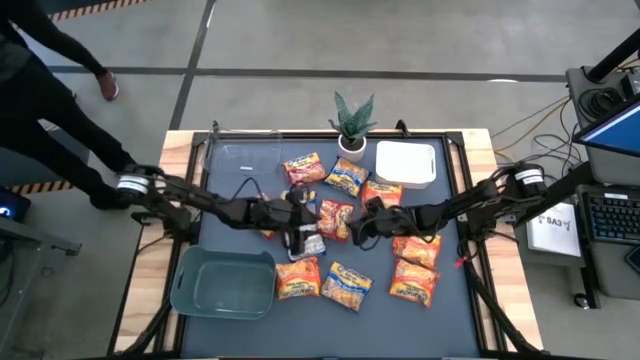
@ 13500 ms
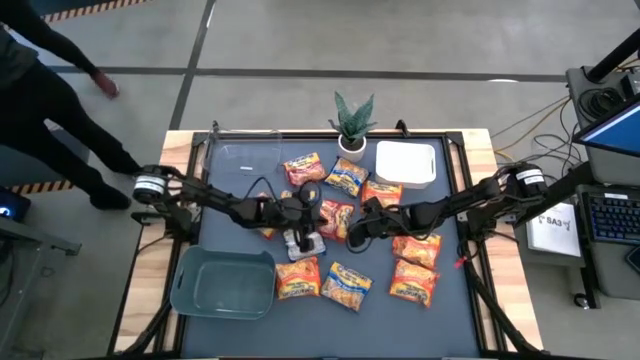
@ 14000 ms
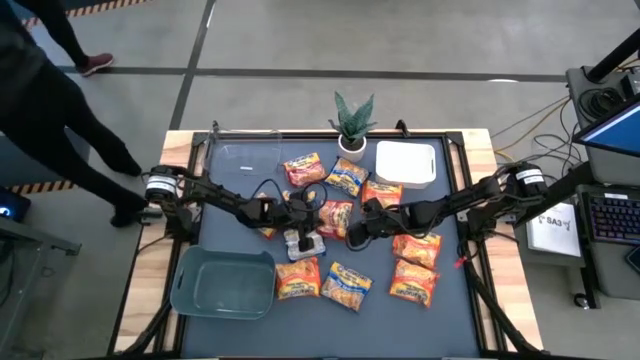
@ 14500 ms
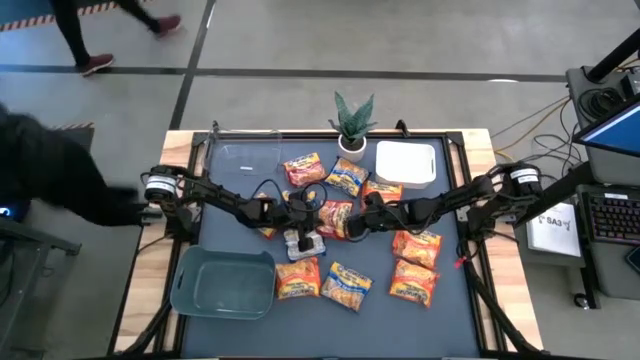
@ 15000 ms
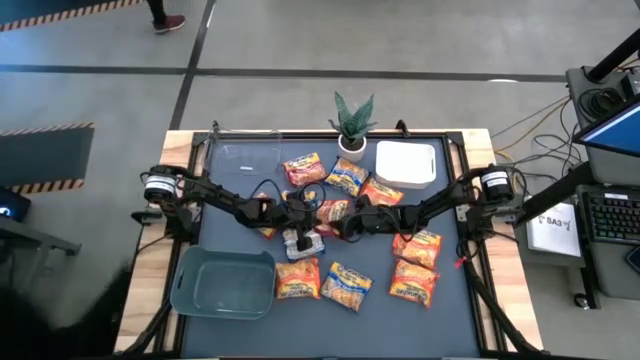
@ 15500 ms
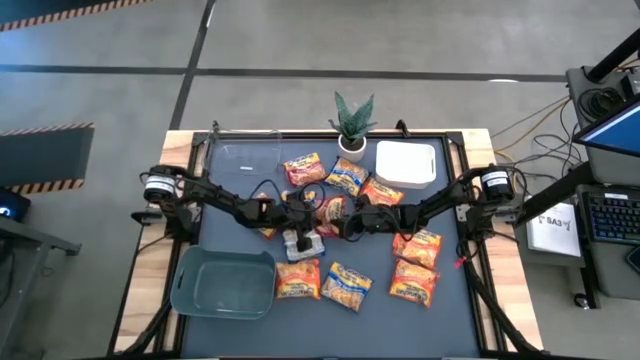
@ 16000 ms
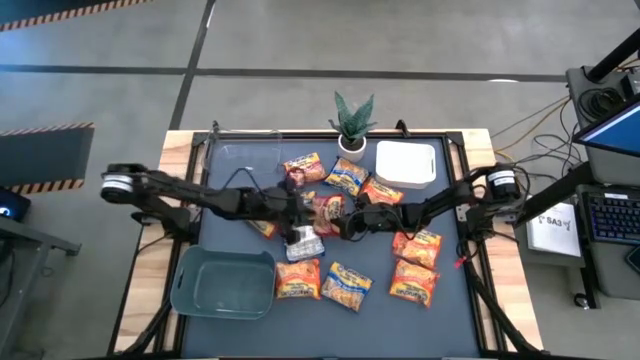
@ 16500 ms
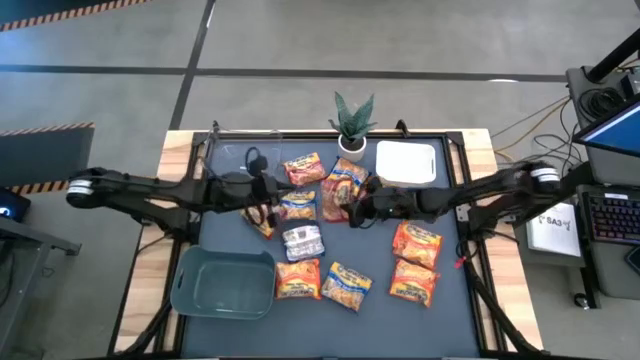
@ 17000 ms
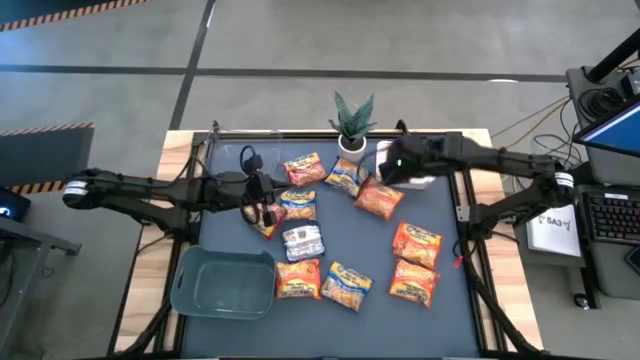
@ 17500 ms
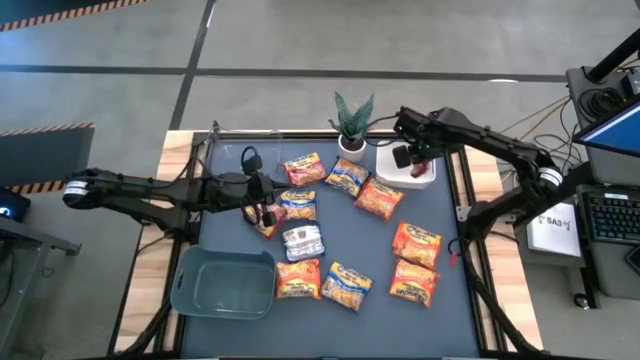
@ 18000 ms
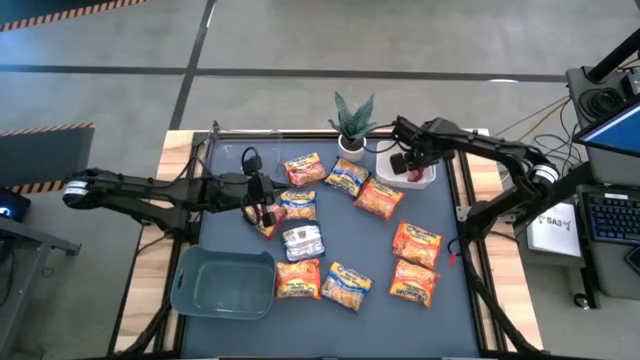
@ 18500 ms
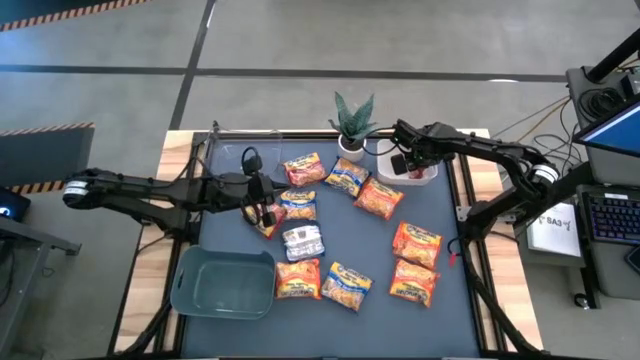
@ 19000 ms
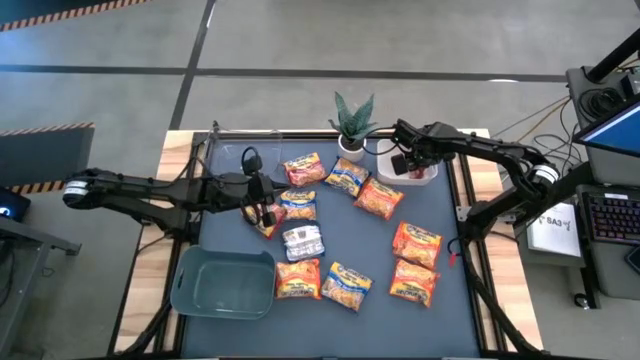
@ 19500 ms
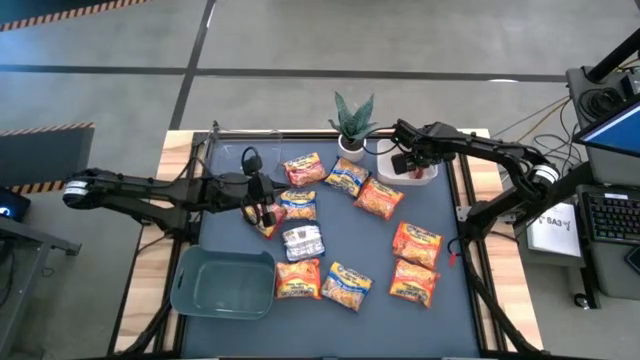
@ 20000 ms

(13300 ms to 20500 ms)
Task: Sort Maruchan noodles
Put the red noodle pack into the white bin

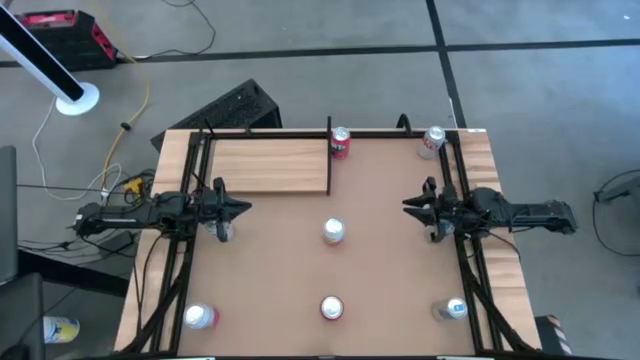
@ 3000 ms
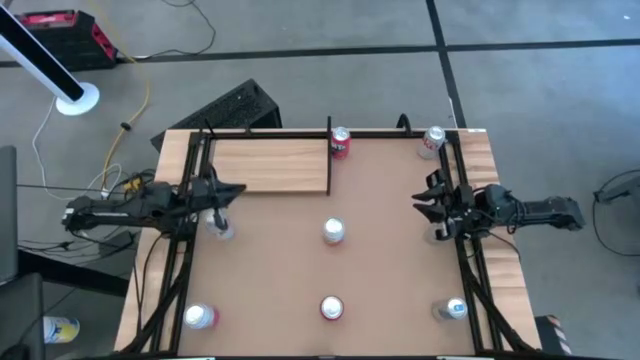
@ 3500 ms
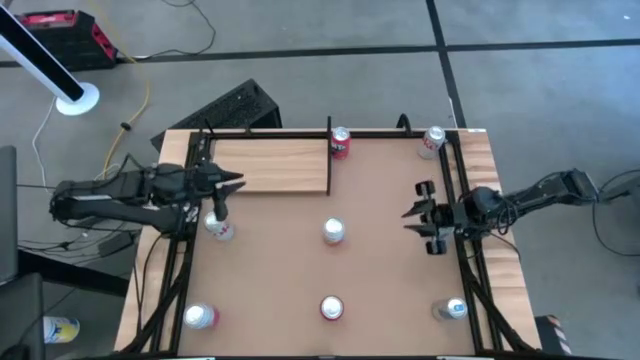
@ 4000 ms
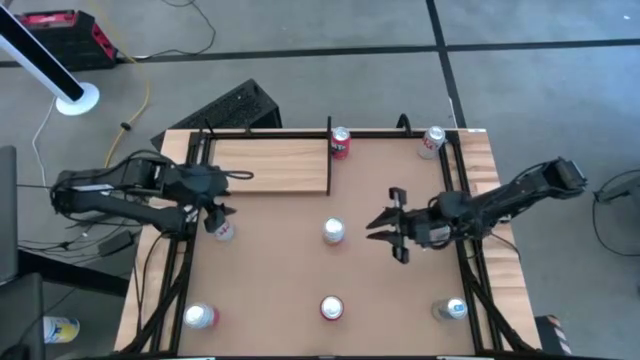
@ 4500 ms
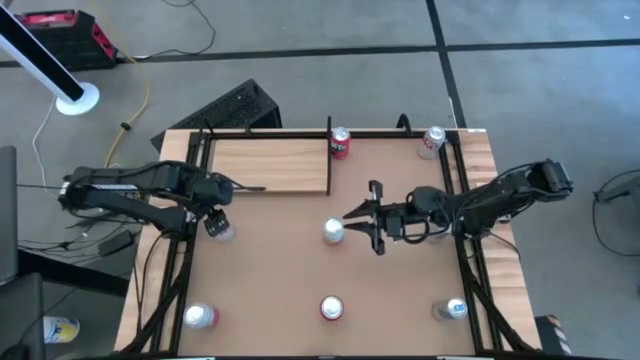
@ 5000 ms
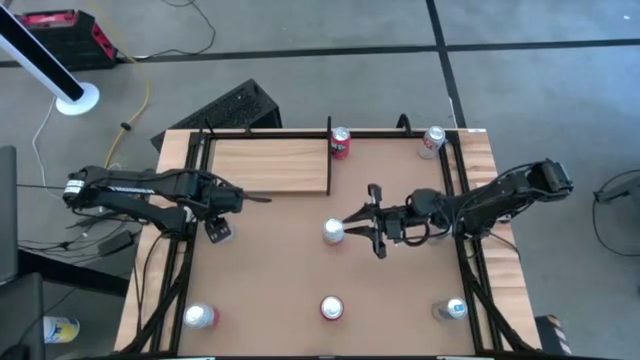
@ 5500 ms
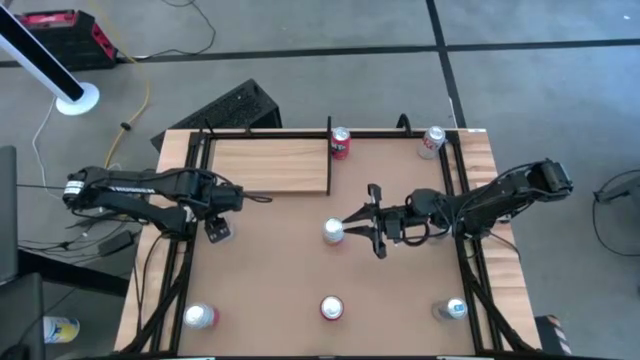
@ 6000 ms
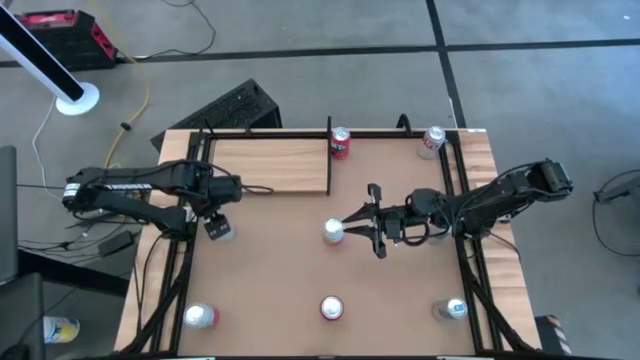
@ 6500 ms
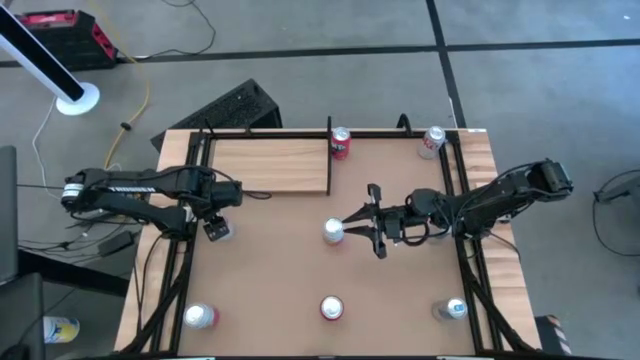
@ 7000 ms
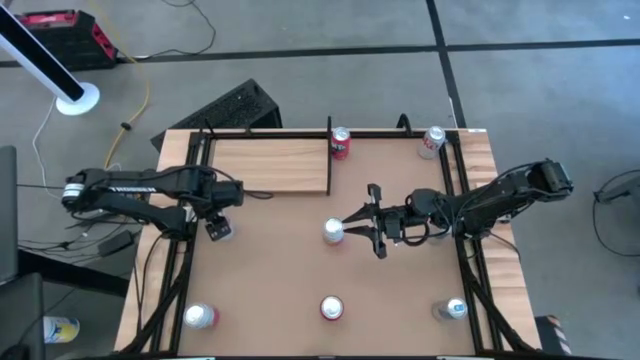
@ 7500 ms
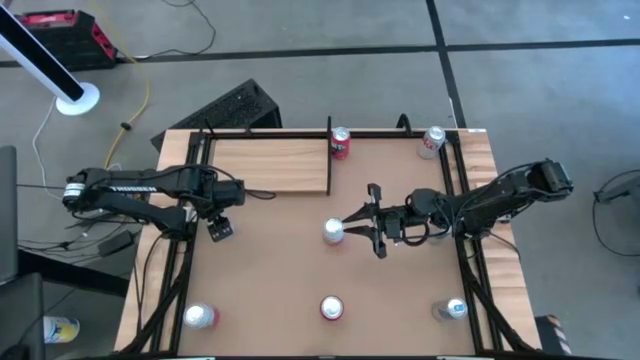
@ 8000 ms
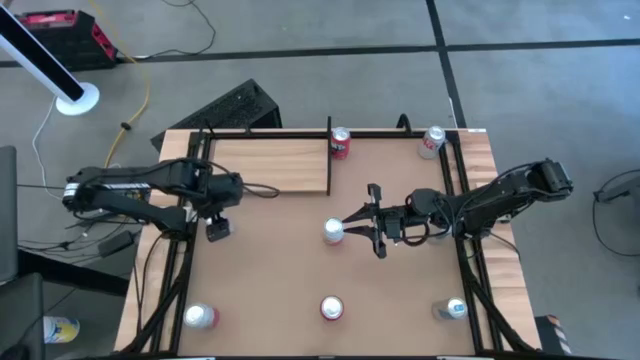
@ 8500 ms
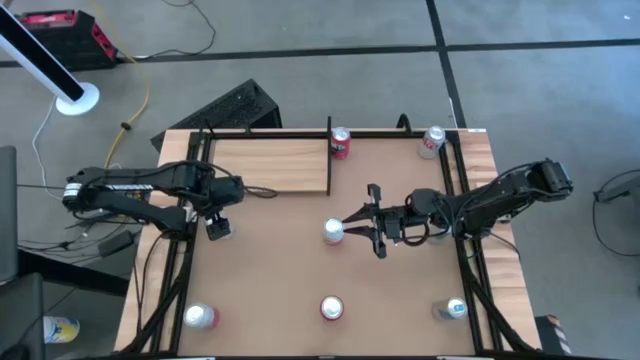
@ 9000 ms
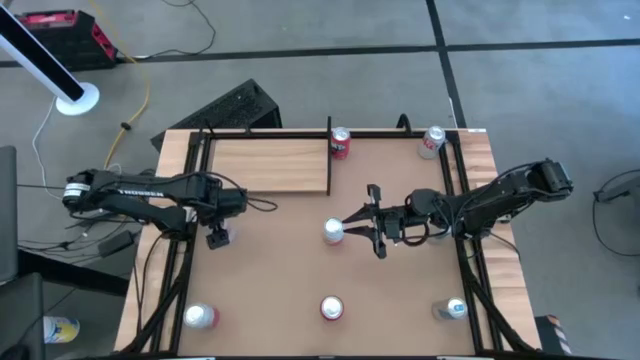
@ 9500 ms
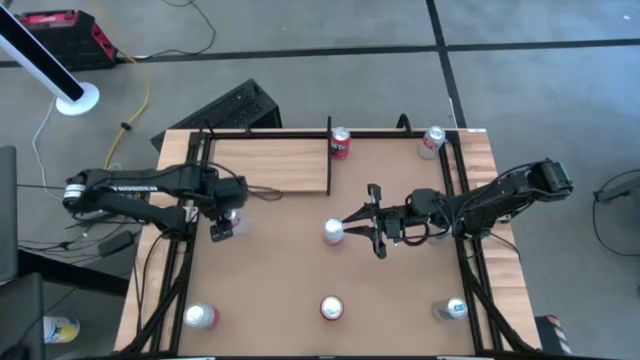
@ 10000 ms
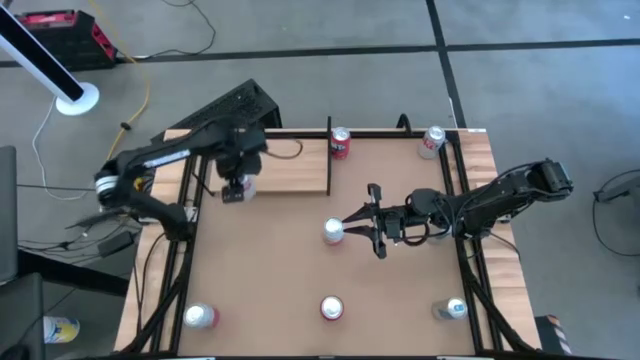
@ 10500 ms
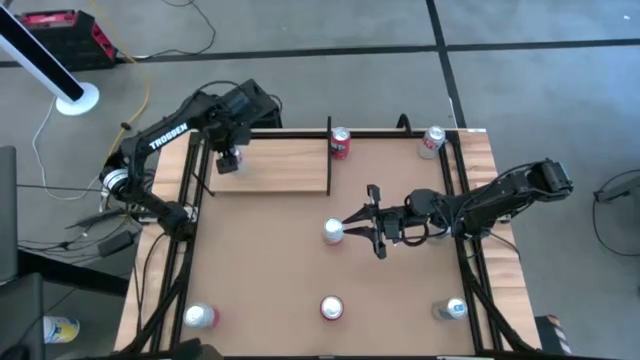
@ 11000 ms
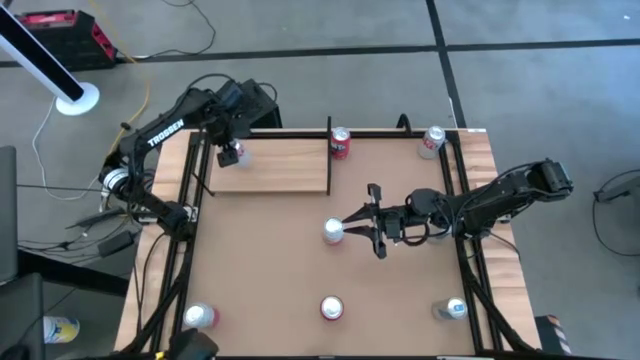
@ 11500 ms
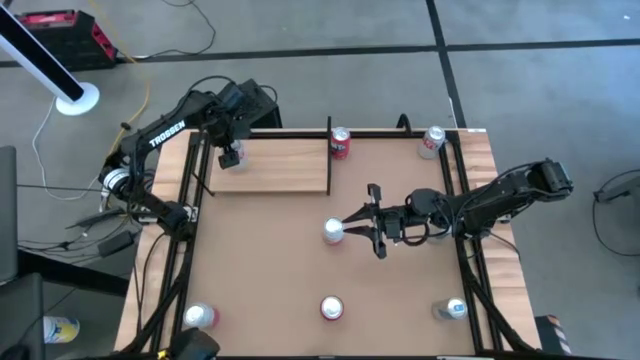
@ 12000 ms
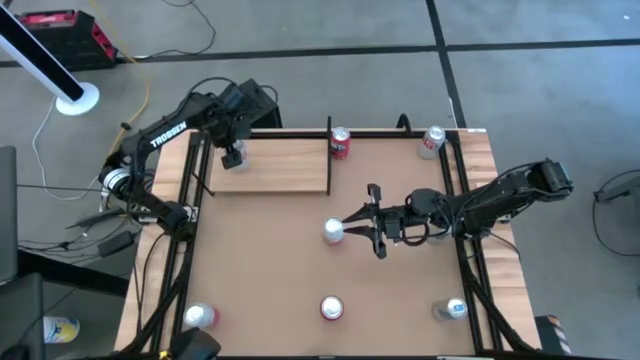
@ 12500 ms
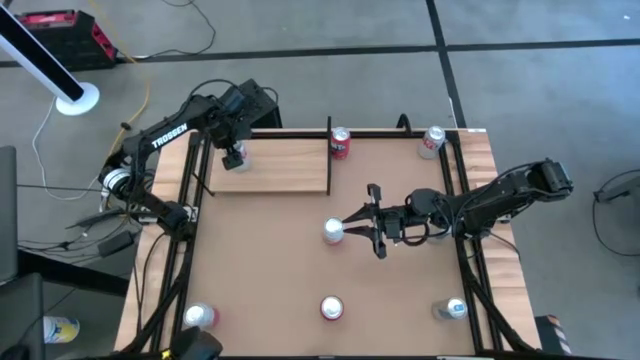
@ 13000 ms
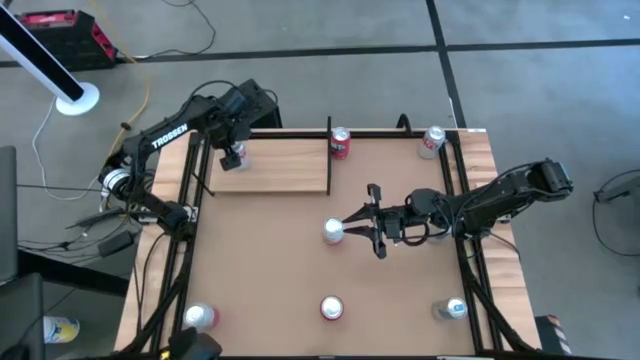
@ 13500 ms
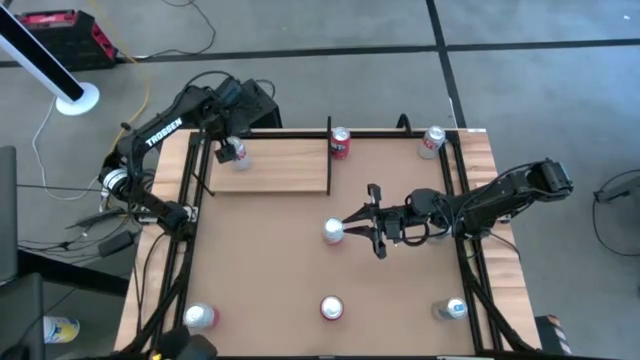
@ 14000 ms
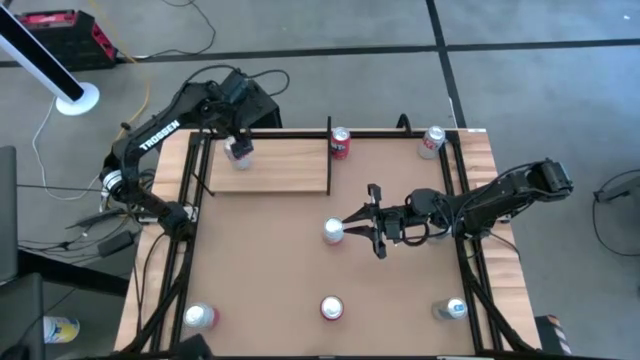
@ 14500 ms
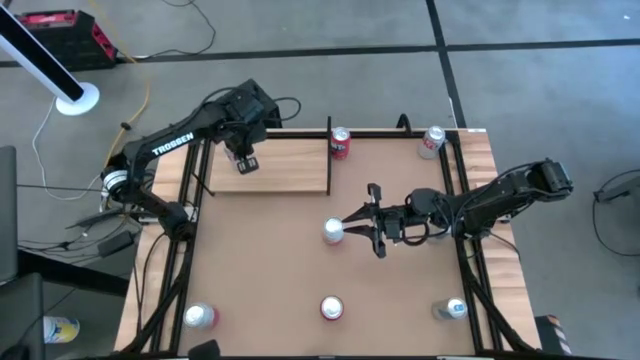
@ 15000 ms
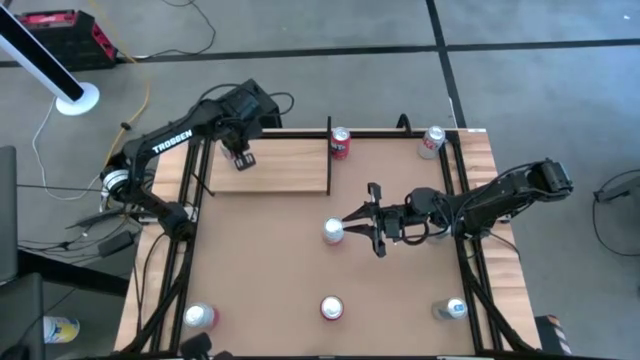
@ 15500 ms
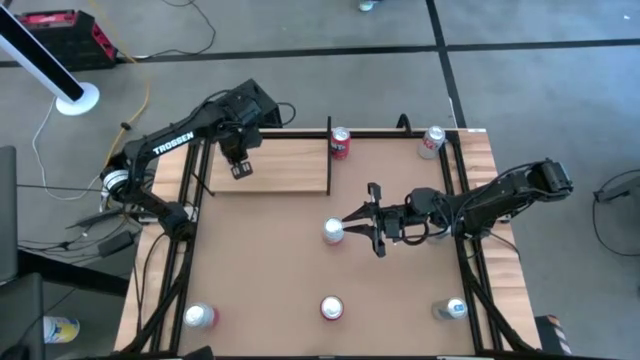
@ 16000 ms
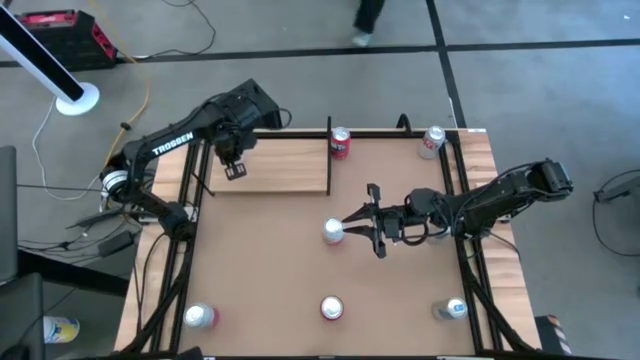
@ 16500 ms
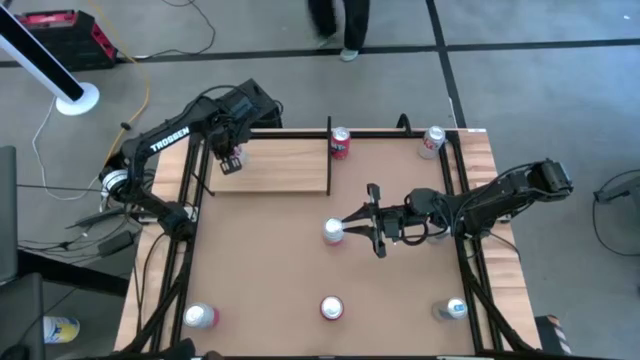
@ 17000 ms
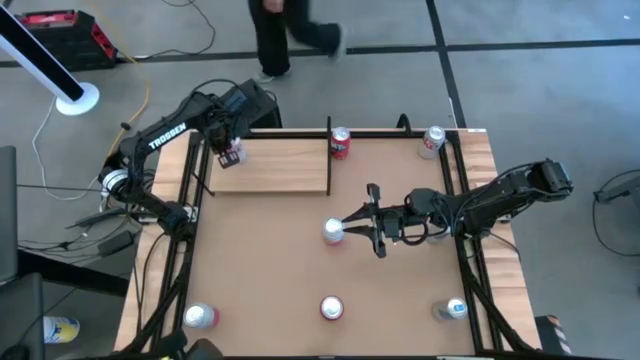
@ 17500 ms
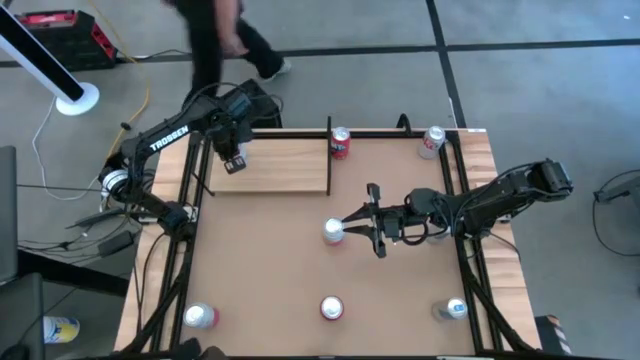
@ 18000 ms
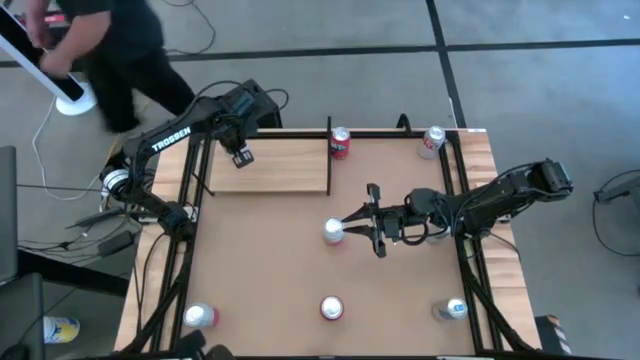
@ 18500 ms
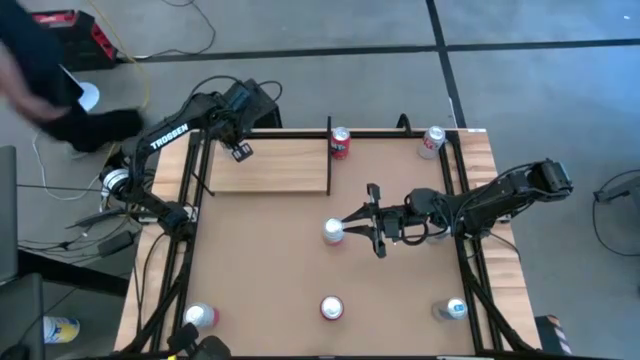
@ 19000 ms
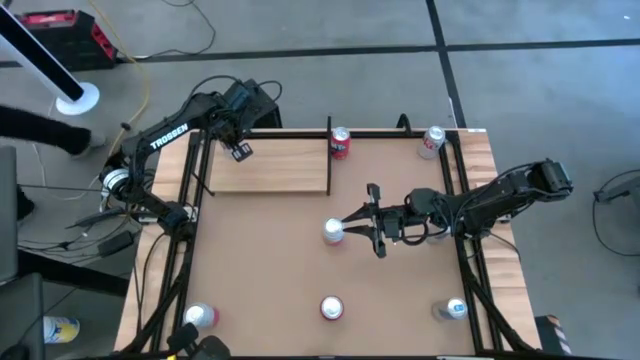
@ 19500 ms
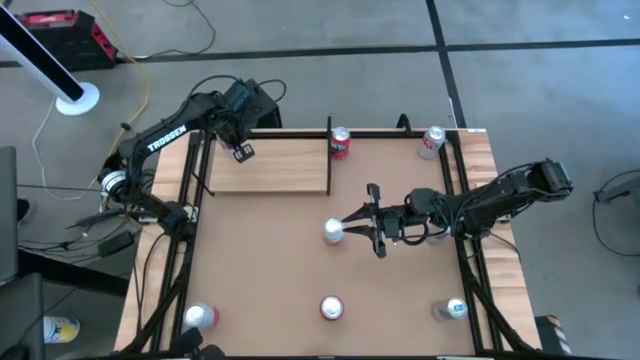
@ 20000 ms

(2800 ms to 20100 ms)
Task: Place canned beverage on shelf
Put the left silver soda can on the shelf
